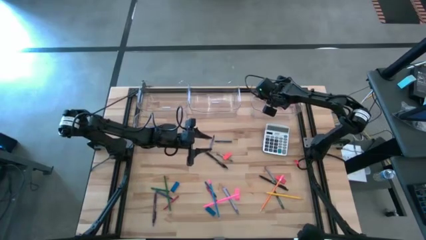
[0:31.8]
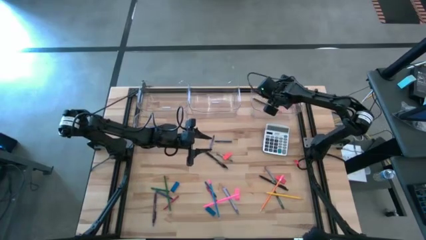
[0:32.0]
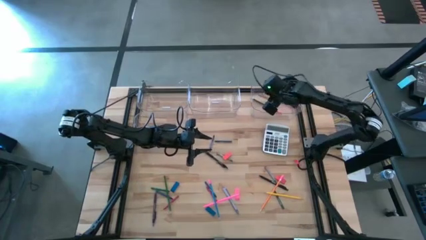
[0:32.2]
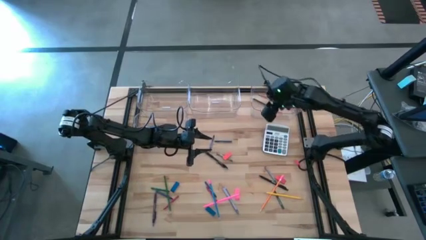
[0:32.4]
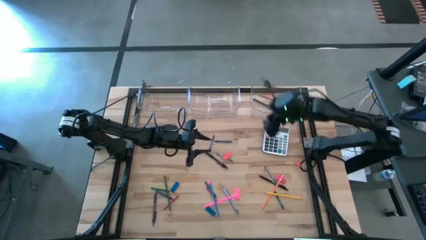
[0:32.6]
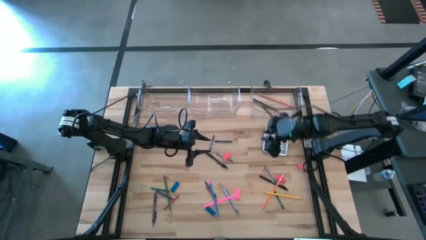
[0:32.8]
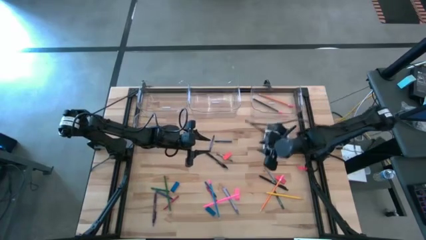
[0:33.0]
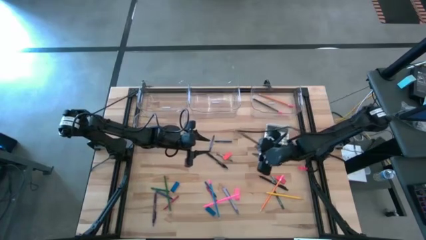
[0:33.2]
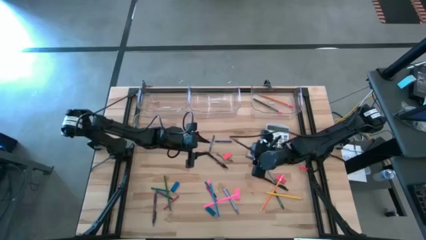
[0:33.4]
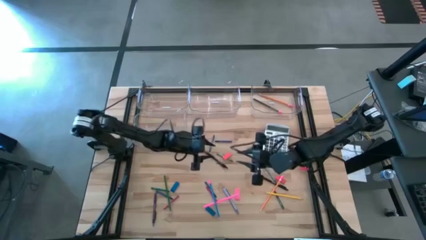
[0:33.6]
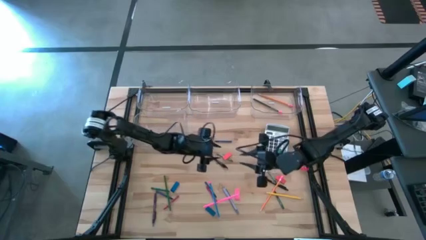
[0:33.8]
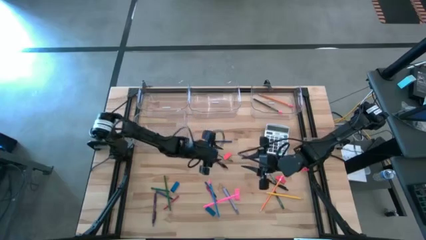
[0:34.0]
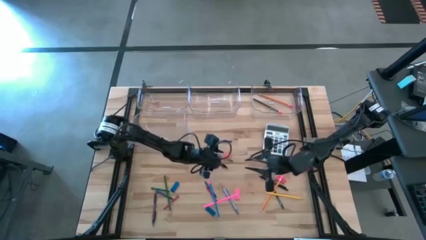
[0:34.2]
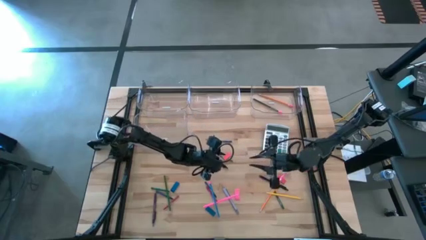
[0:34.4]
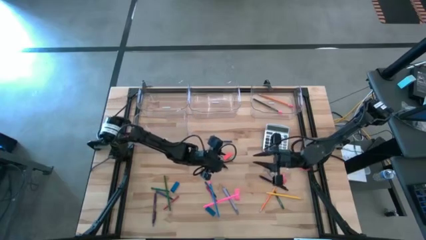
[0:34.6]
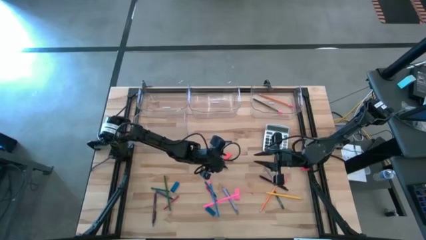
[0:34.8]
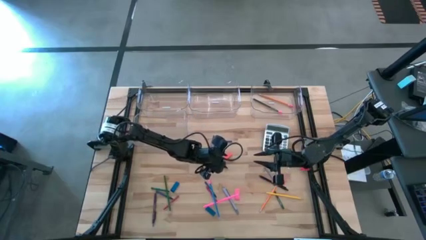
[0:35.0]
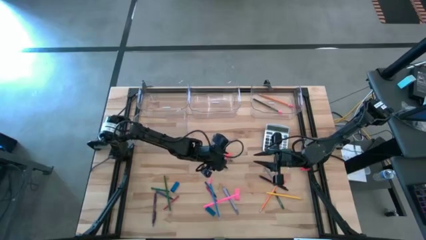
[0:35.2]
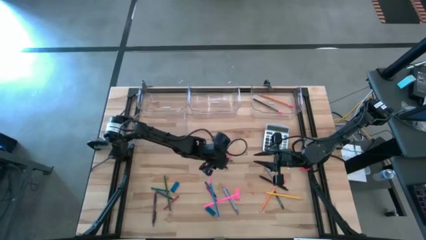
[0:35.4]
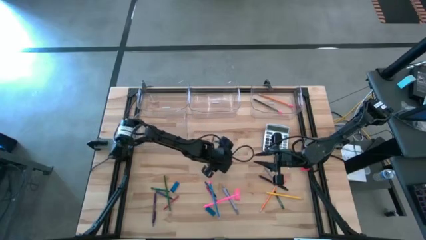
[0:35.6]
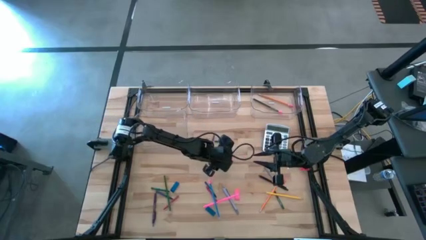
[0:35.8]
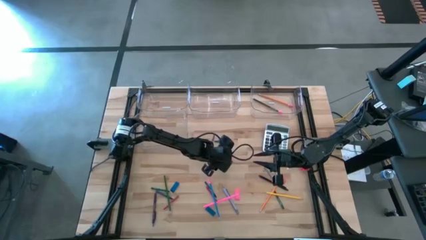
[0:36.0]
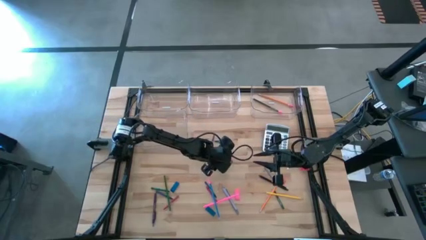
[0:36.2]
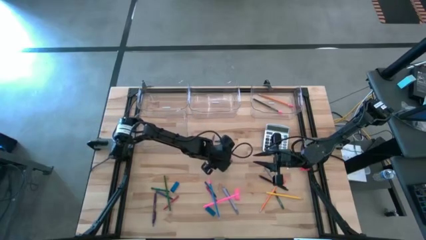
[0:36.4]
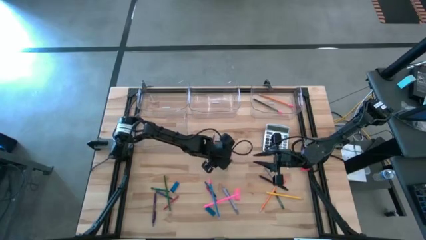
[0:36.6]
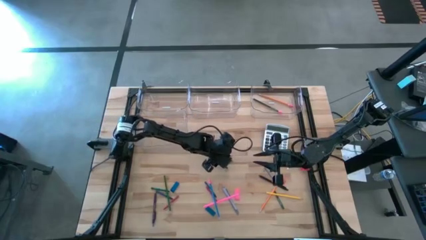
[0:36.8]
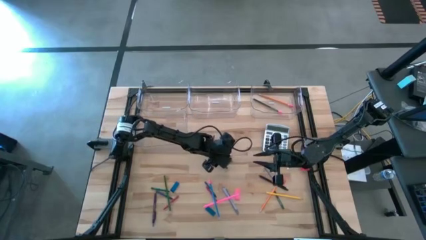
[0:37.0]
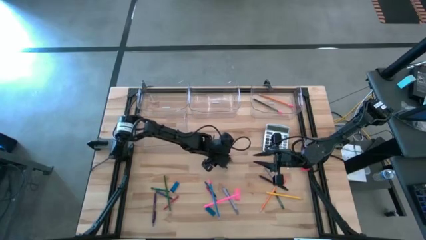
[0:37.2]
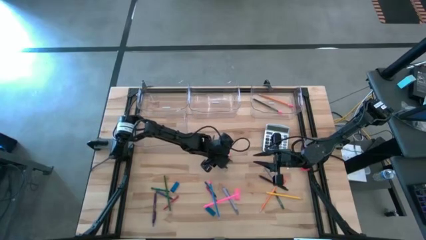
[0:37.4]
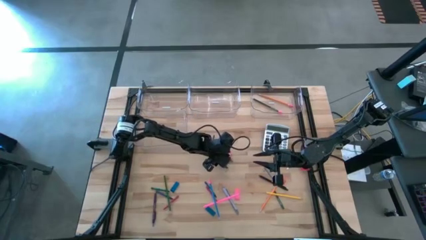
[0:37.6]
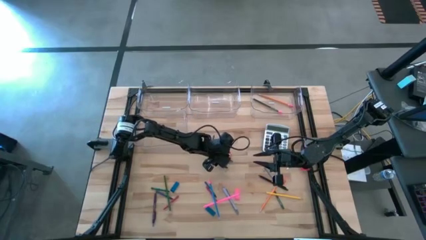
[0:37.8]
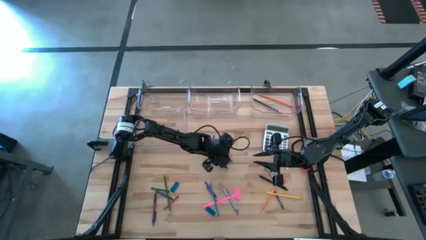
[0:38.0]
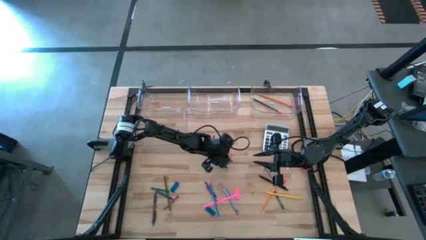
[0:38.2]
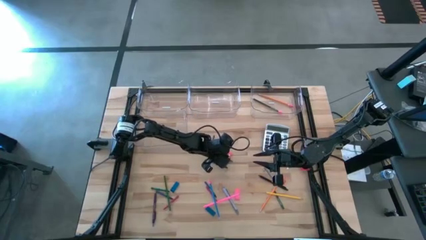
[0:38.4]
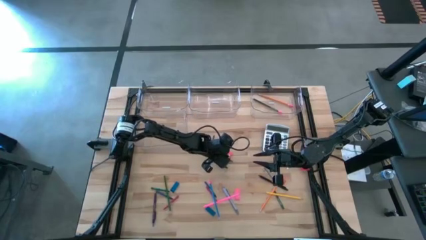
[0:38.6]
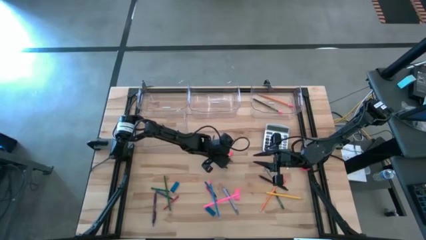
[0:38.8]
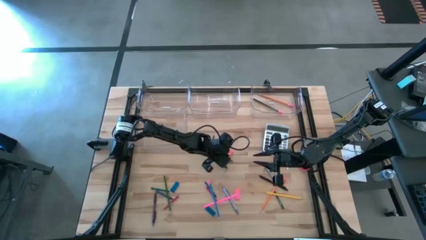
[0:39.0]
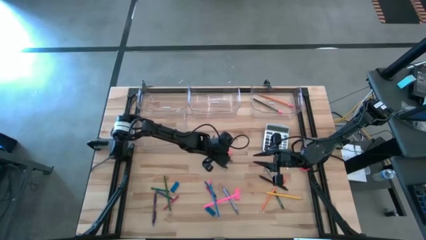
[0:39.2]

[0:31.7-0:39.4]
Task: Sort crayons/erasers/pens/pencils in bins
Put the orange eraser into the bottom transparent bin

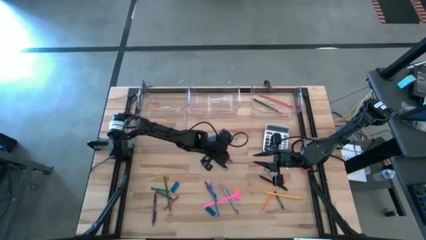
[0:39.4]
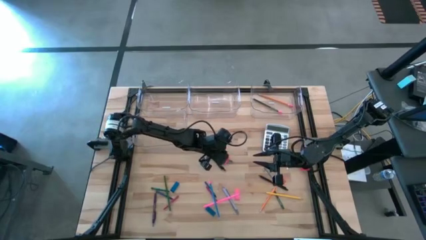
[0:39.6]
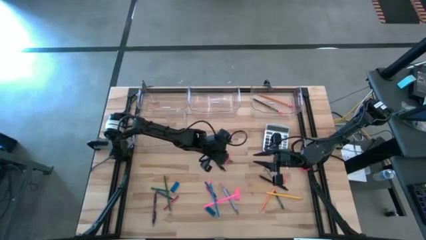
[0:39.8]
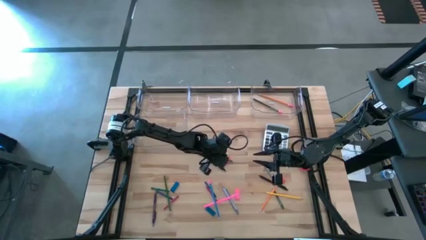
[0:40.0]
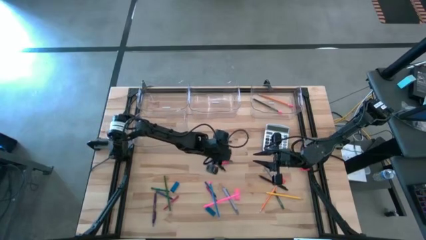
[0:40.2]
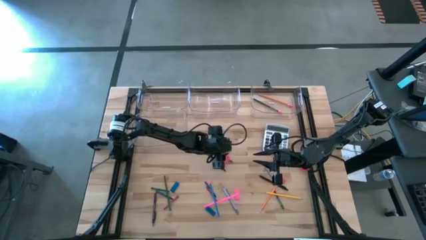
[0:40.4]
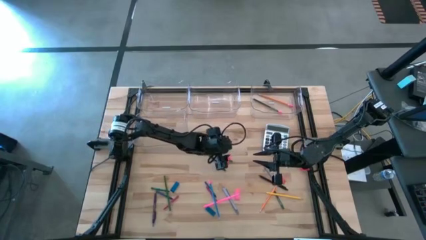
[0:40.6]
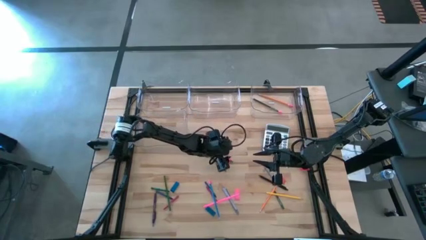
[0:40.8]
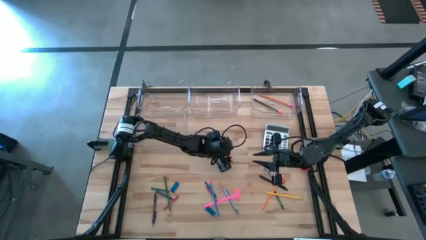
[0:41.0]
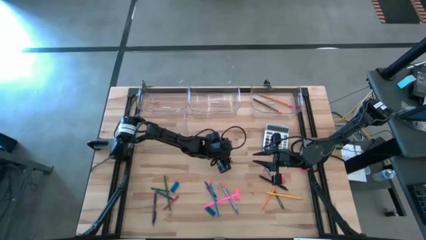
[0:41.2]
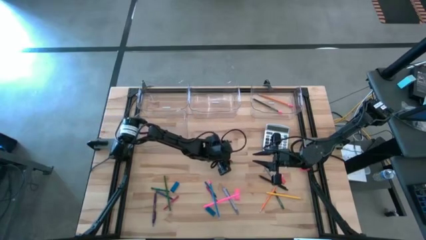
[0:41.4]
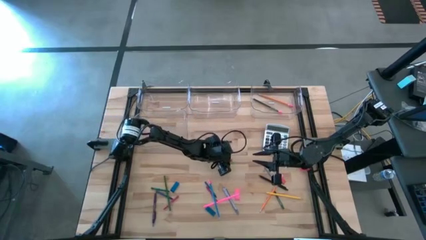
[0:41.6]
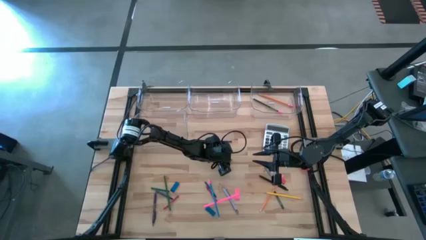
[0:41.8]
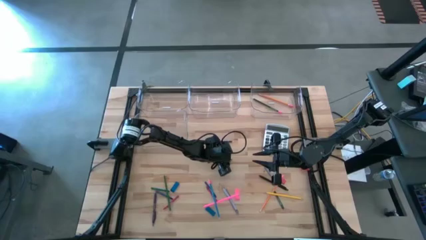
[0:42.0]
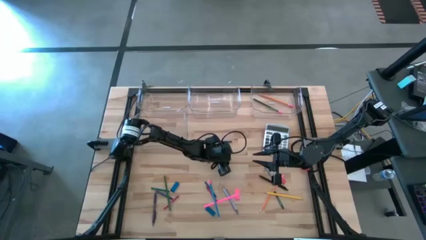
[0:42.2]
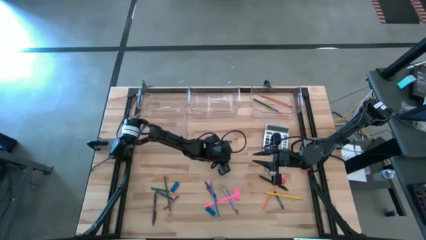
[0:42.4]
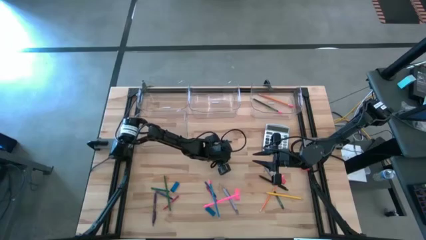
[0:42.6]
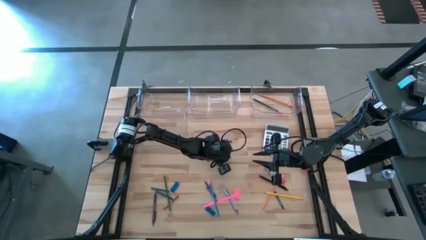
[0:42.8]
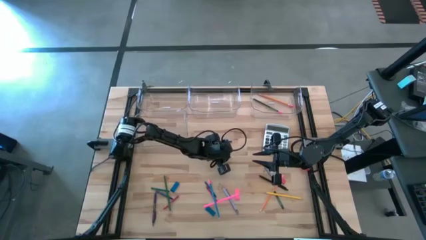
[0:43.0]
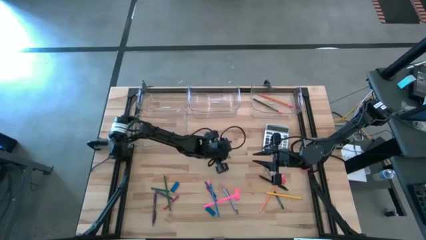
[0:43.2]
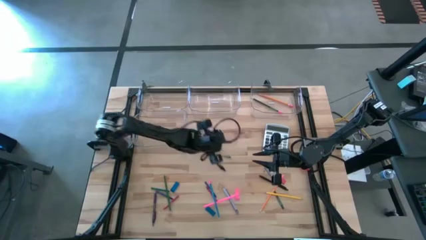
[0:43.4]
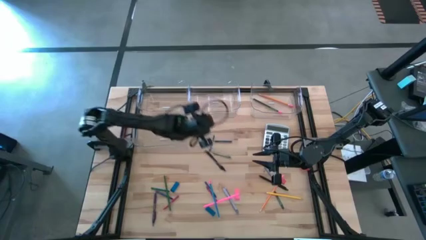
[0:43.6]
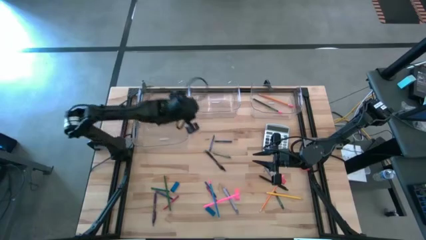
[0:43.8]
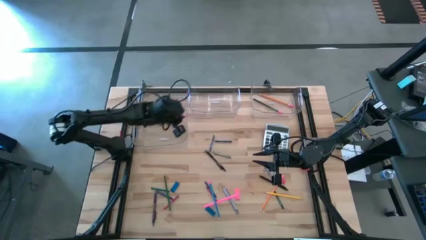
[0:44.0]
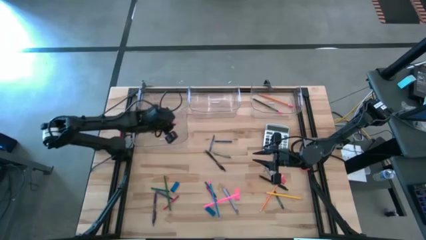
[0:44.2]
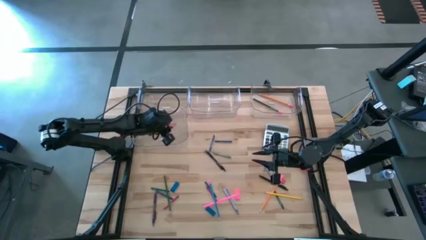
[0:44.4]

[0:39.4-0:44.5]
Put the orange eraser into the bottom transparent bin

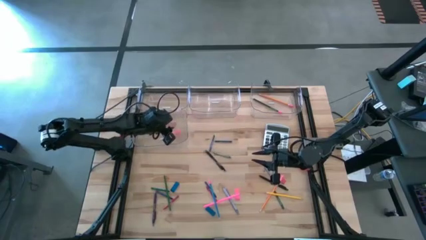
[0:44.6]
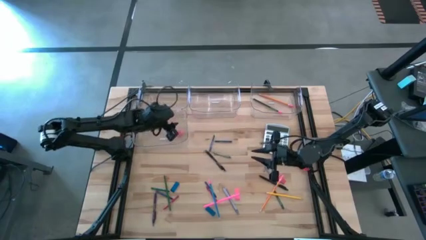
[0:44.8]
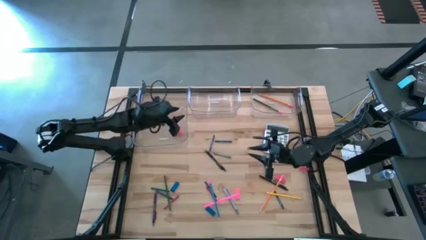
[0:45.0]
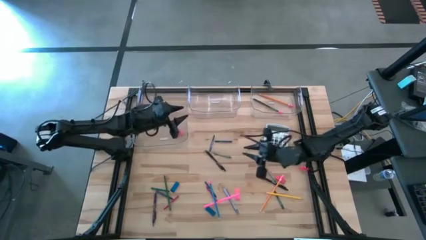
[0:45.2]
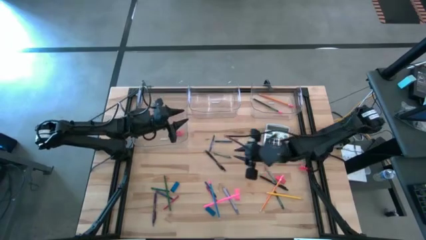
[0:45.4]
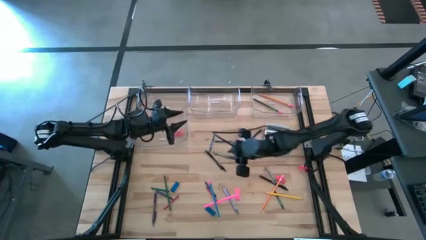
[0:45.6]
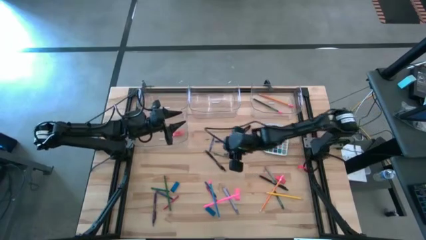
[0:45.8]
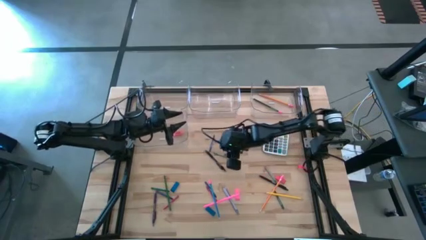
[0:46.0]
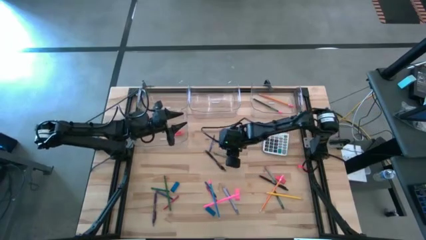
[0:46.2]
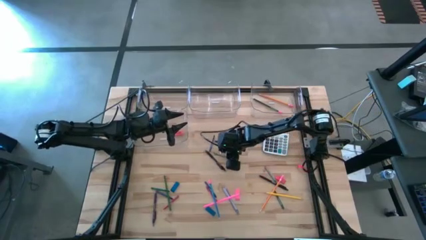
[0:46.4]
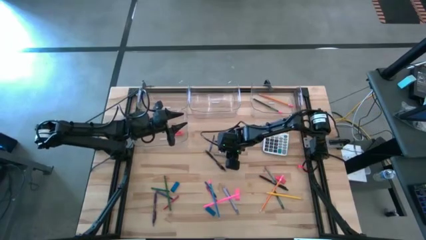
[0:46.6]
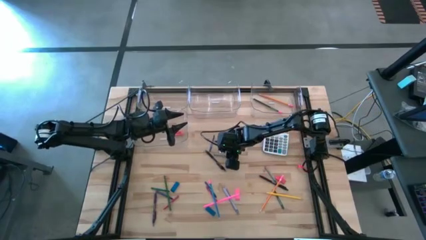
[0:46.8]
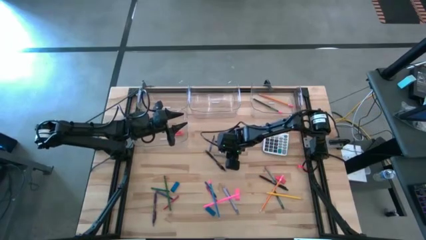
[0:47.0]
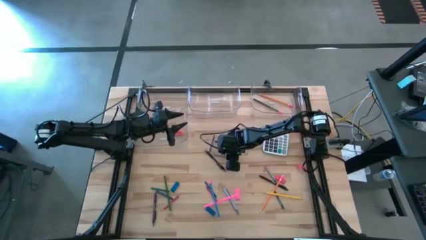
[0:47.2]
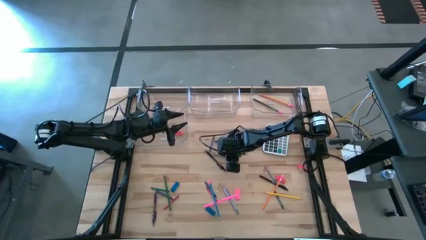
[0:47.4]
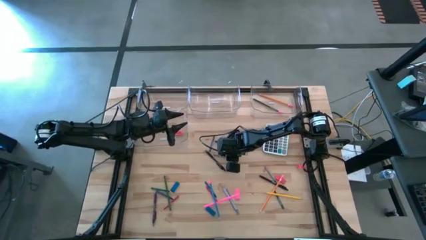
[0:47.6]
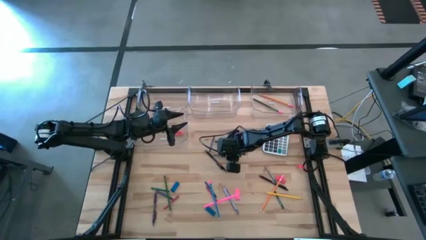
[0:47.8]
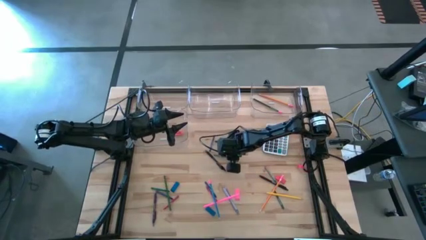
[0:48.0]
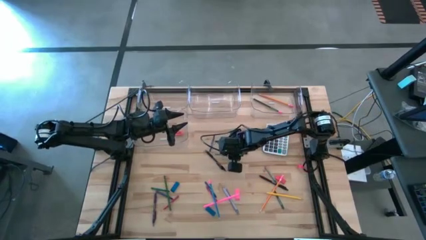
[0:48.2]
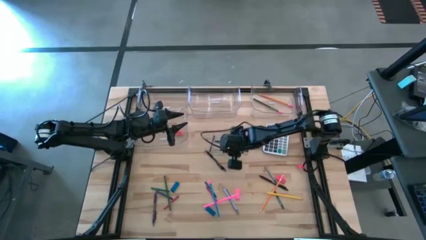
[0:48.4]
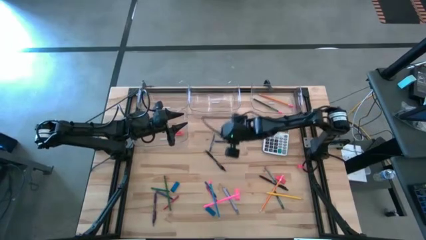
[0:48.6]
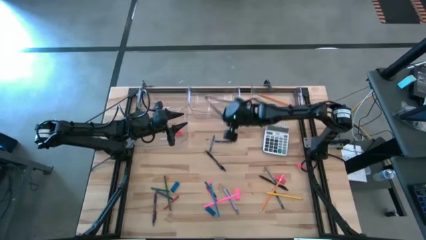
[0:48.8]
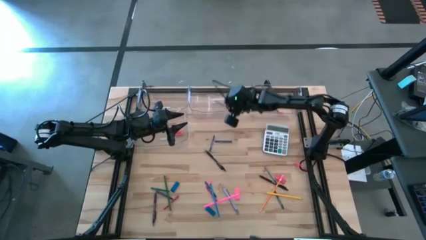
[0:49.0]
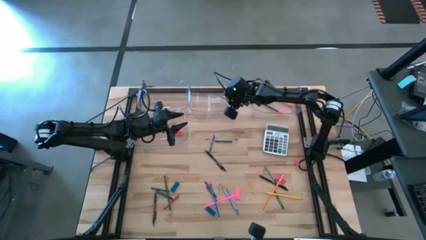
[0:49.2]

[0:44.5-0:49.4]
Put the gray crayon into the top center transparent bin
